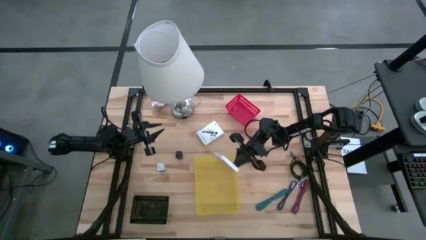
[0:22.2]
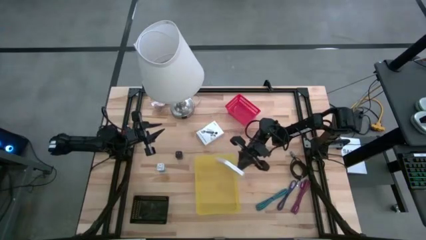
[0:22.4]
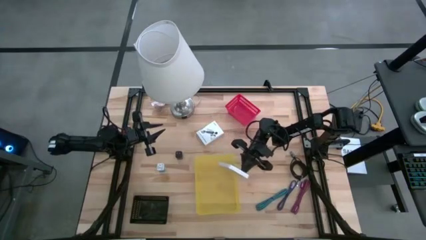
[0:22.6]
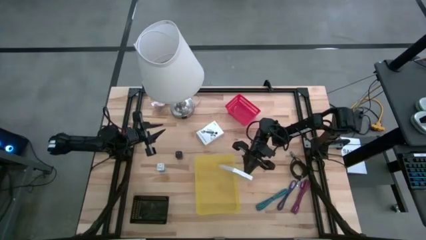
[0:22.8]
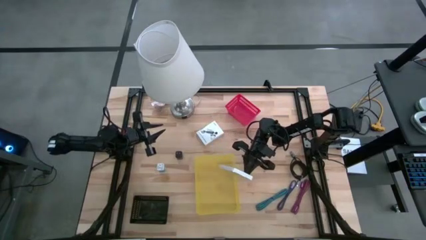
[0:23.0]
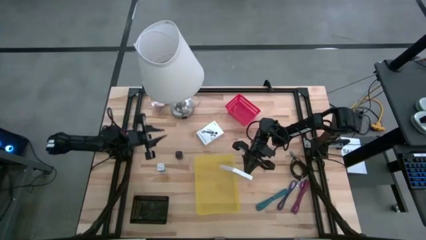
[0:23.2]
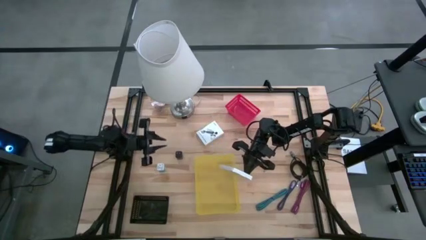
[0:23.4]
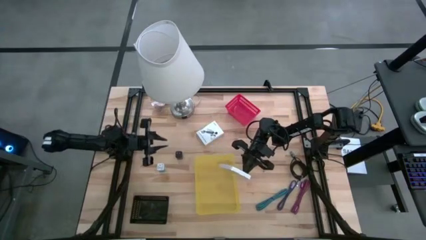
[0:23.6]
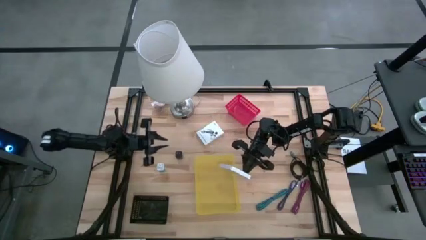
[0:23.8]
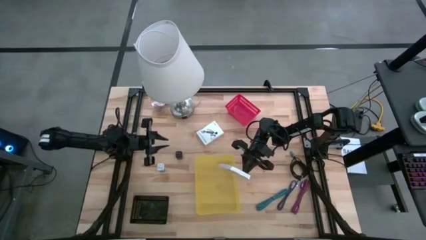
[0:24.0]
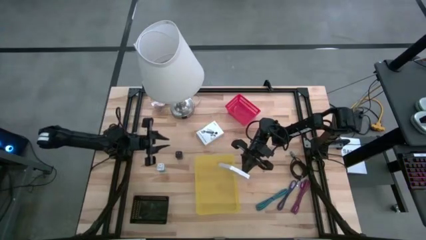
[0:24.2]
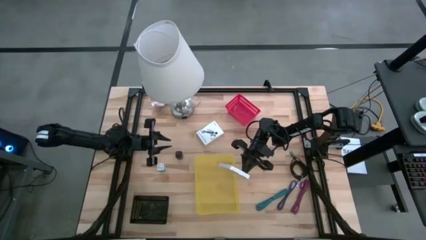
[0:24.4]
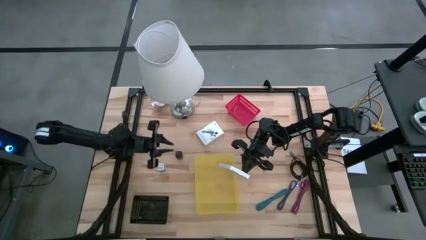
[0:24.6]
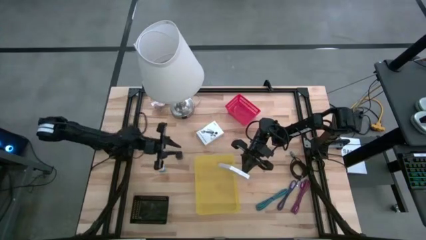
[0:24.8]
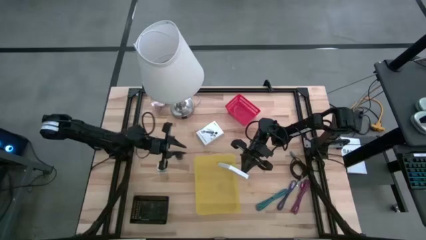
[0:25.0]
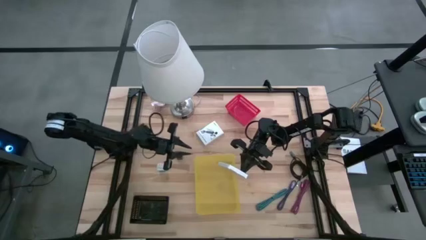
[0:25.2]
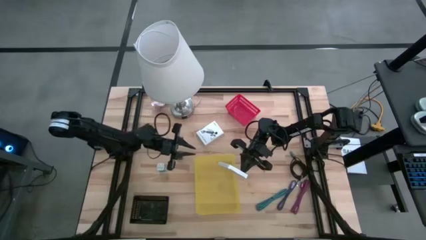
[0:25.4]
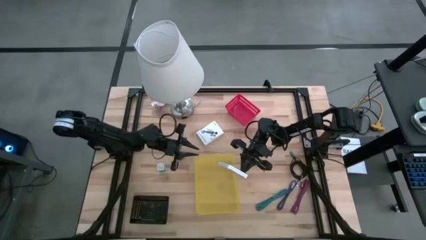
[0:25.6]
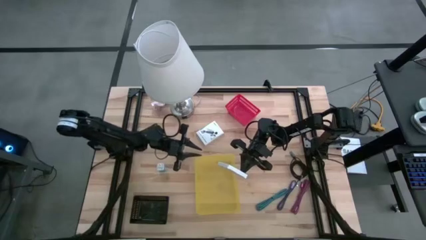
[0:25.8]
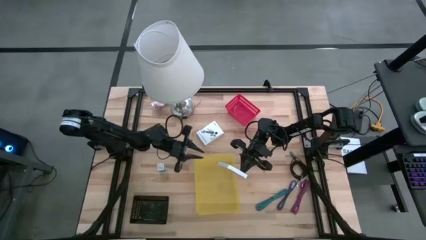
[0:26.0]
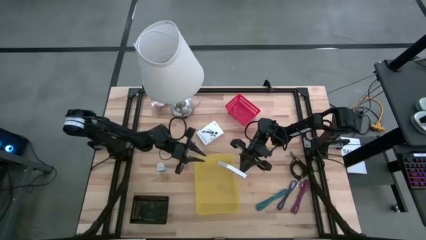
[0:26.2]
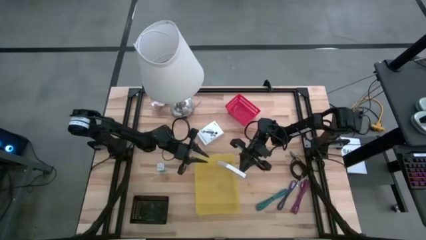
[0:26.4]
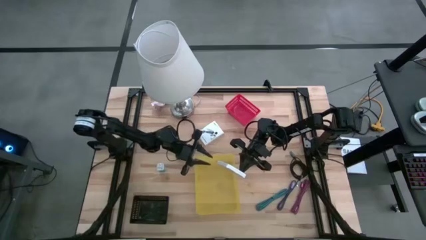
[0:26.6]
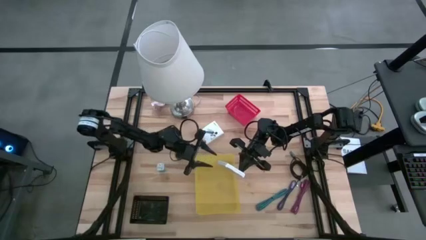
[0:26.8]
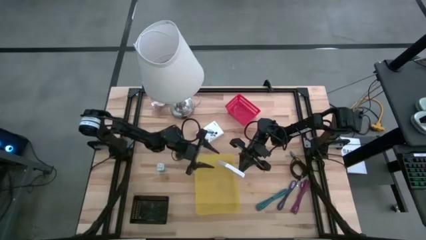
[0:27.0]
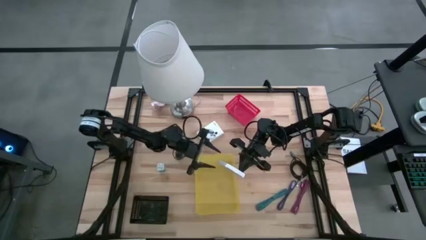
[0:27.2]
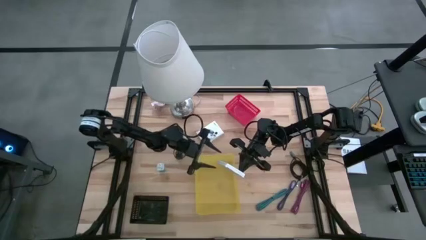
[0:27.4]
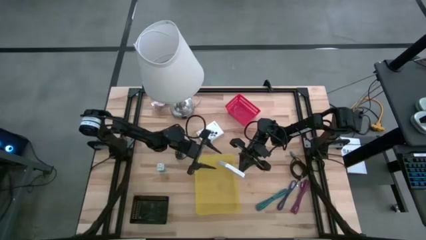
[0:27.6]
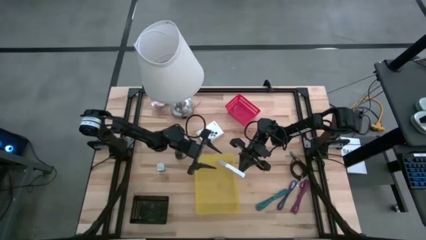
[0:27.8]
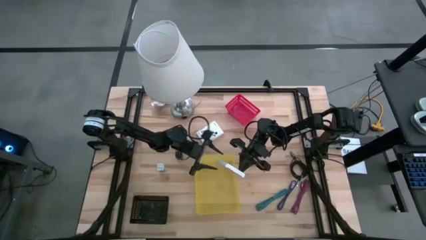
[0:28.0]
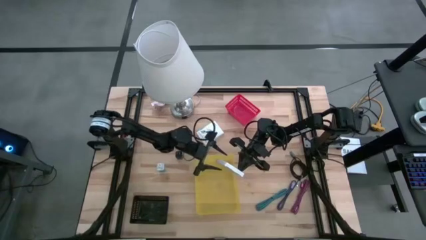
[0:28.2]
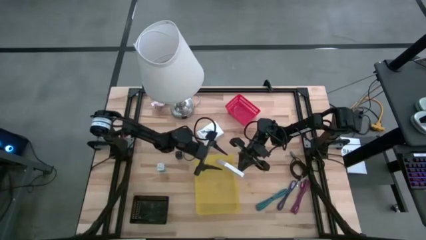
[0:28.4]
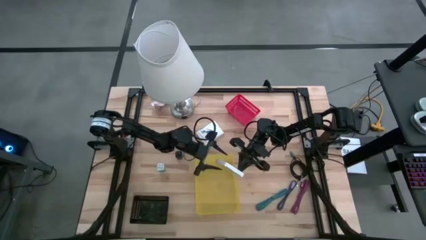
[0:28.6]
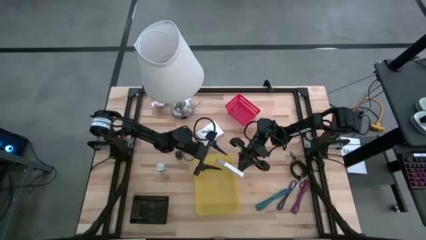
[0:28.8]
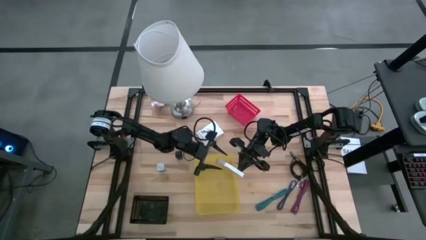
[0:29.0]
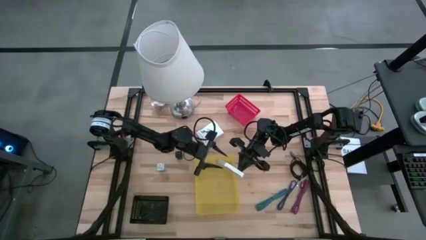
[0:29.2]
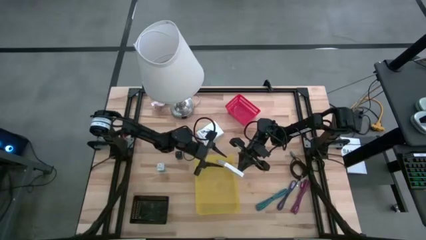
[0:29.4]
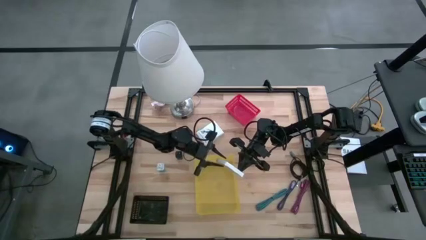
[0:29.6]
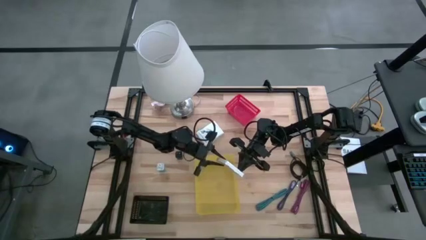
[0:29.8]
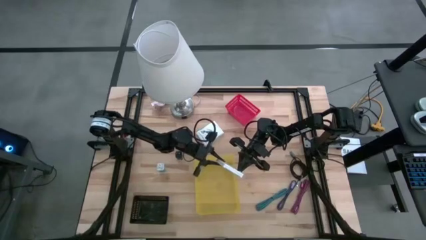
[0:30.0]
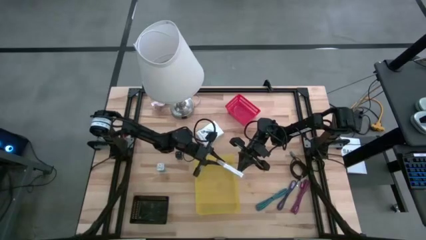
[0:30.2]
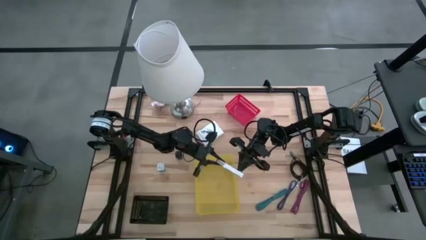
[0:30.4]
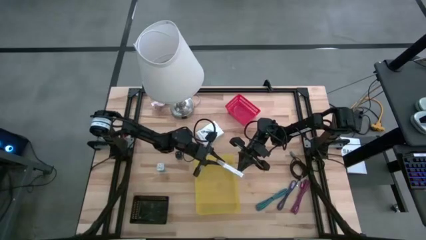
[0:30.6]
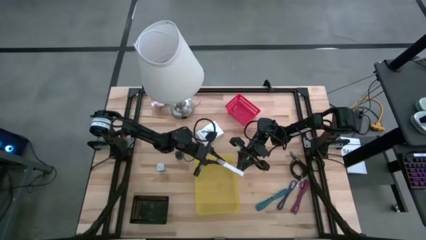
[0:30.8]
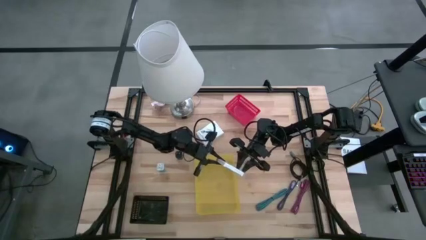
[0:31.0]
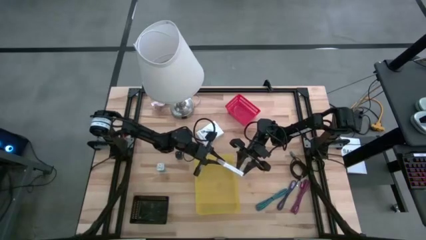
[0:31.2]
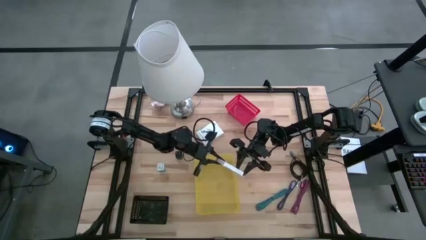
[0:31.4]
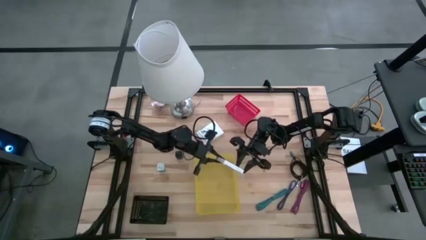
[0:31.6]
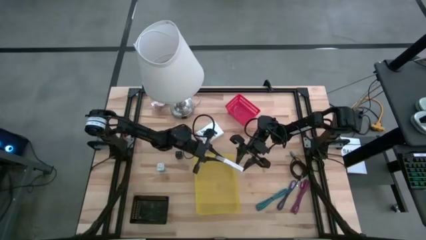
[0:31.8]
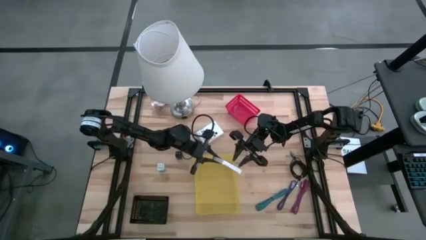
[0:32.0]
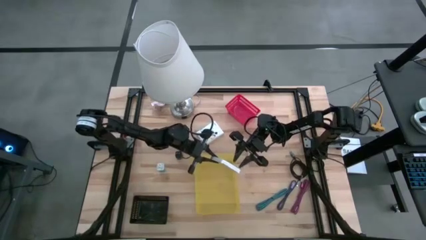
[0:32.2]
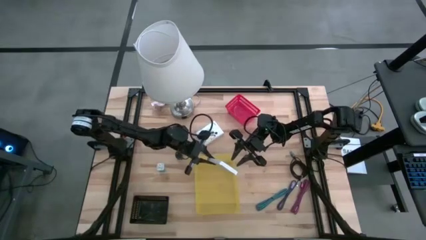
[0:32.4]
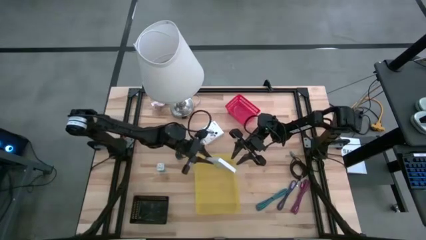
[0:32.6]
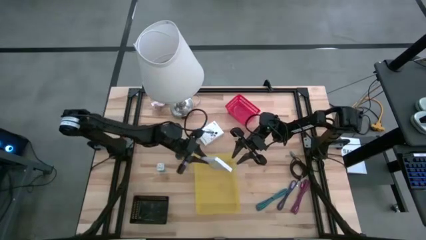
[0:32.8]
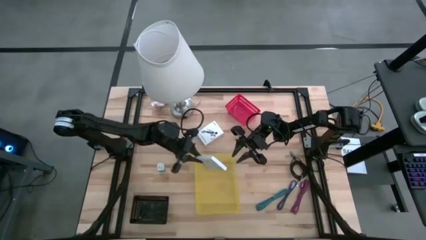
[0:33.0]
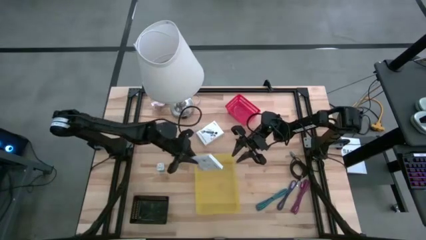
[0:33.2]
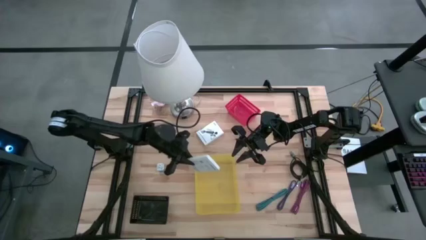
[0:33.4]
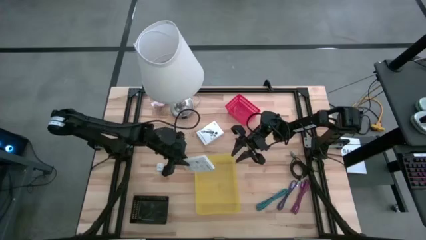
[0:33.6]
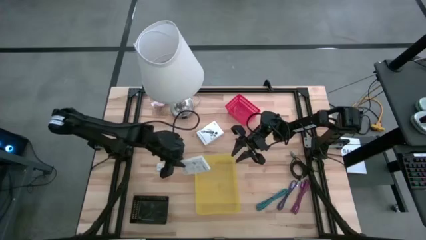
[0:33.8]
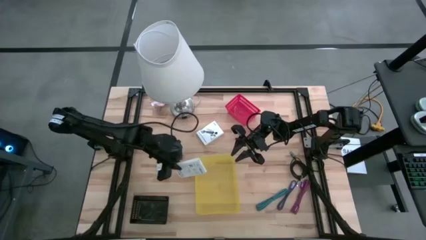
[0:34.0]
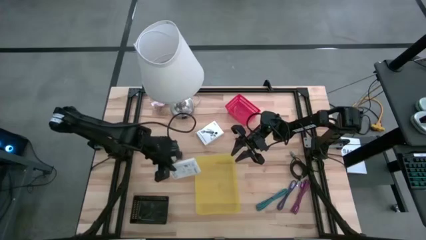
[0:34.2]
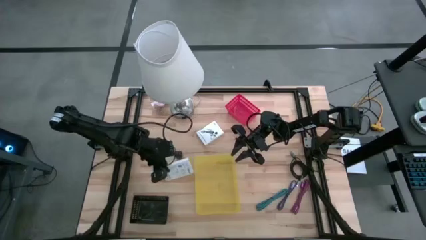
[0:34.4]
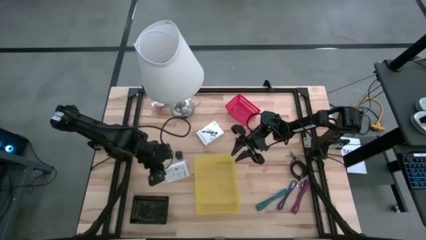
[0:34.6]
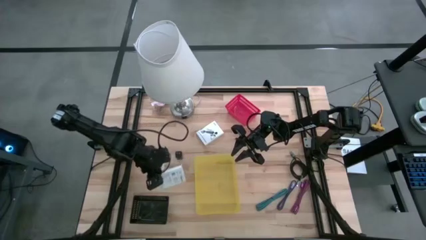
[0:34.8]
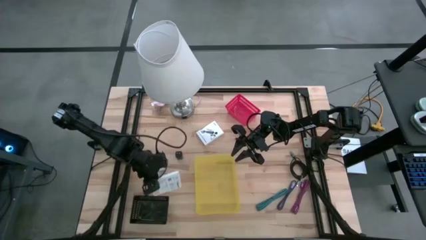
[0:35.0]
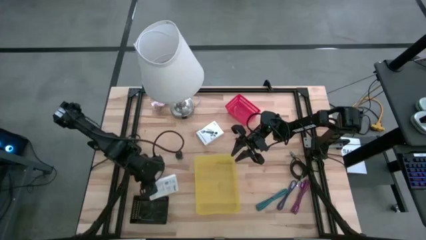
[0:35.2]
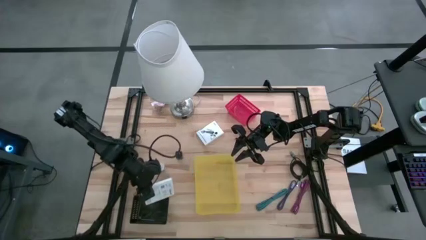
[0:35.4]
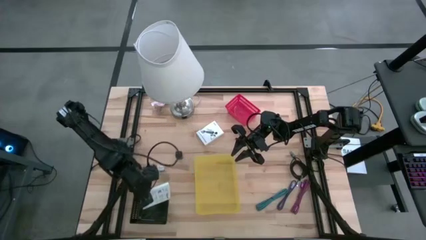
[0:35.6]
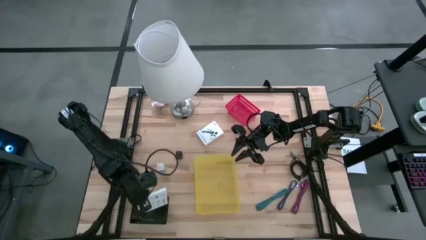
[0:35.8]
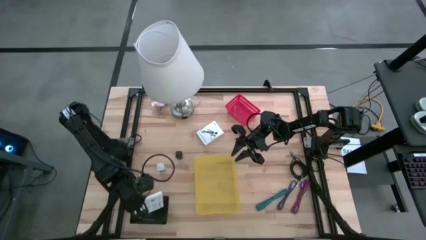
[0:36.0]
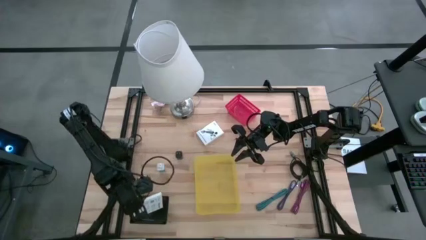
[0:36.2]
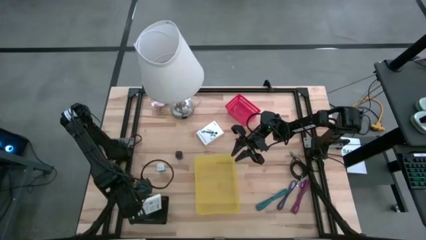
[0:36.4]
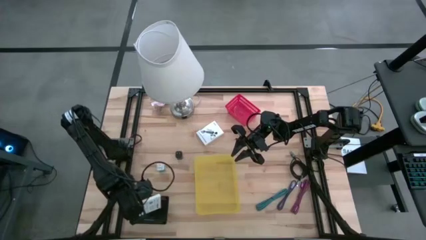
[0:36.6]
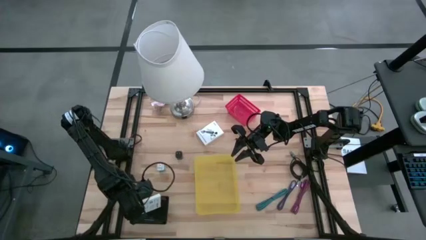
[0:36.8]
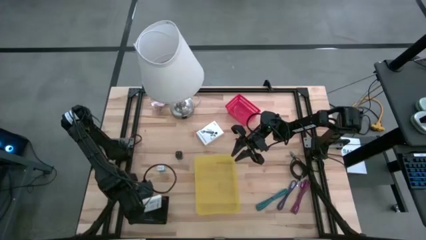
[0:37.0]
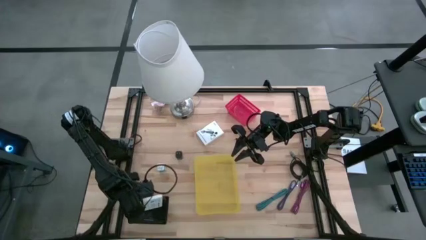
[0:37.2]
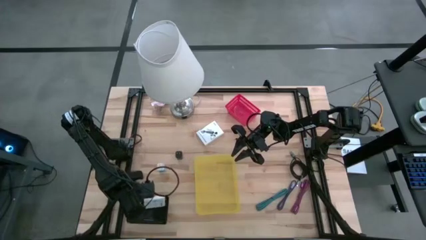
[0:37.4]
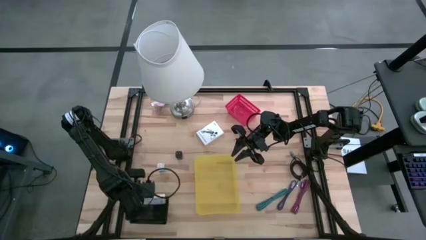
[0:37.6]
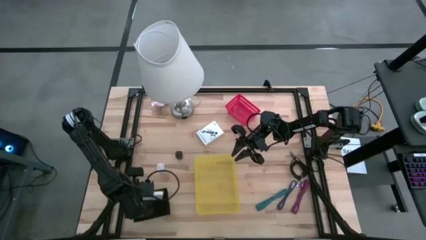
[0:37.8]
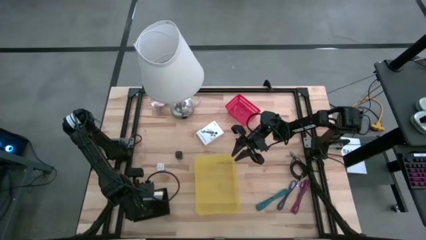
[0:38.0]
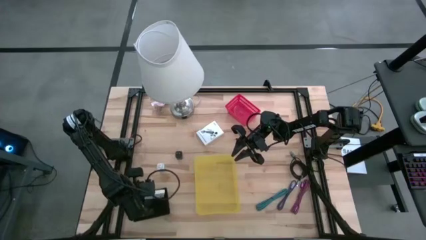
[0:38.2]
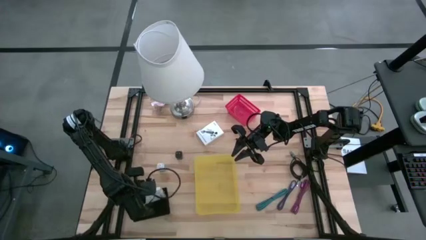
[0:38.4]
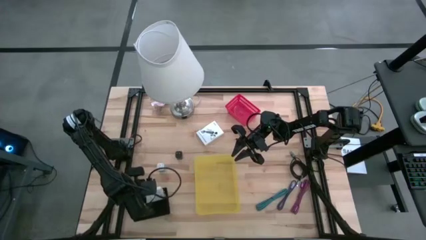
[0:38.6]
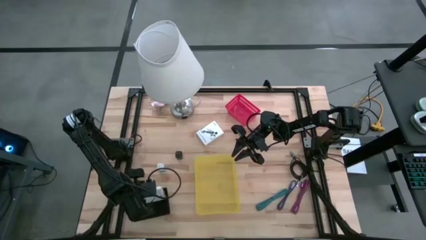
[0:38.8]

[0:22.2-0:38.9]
Task: Pick and place items into bin
Put the right card reader box into the black bin
